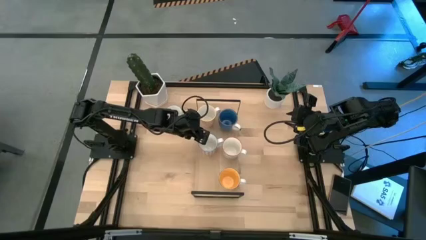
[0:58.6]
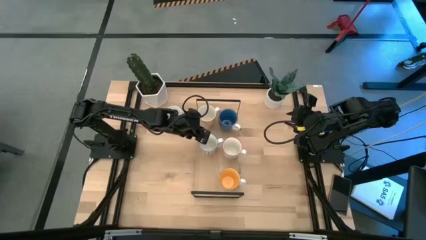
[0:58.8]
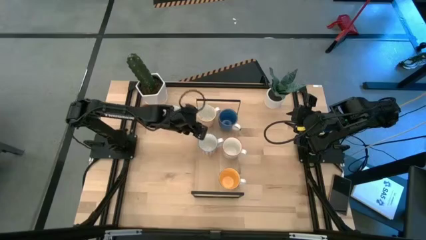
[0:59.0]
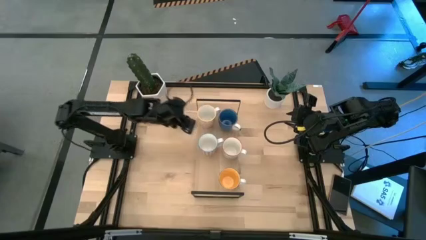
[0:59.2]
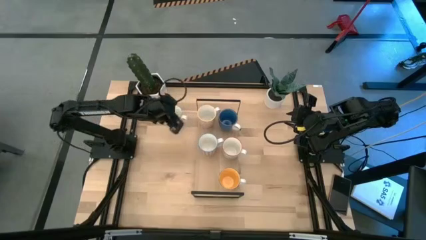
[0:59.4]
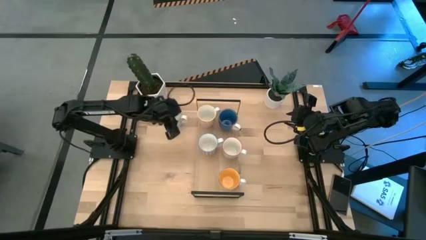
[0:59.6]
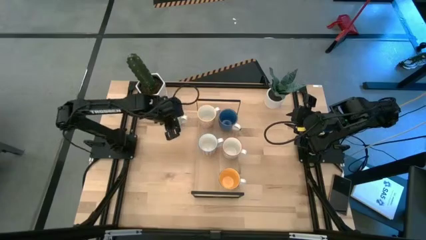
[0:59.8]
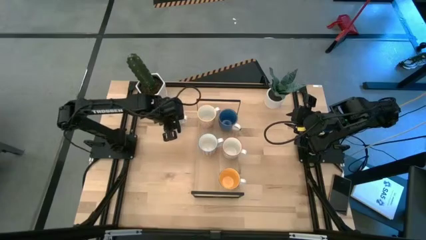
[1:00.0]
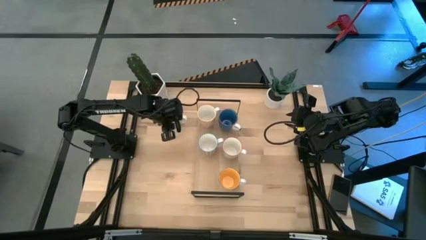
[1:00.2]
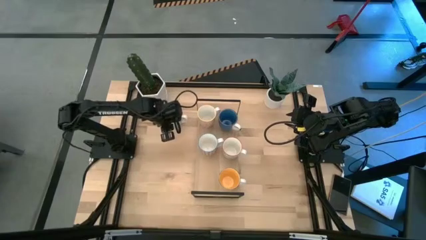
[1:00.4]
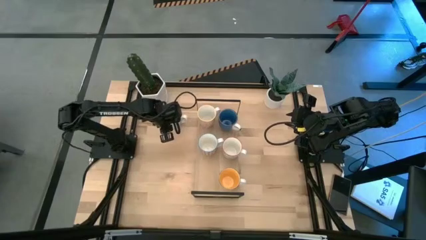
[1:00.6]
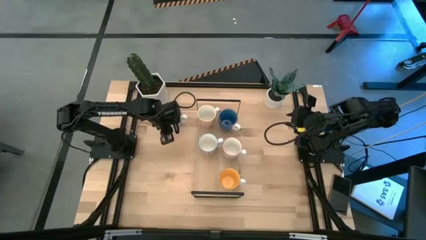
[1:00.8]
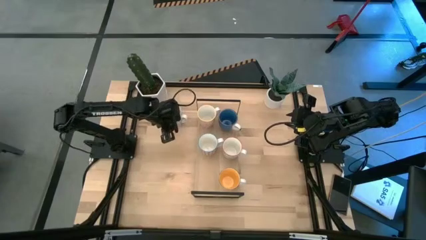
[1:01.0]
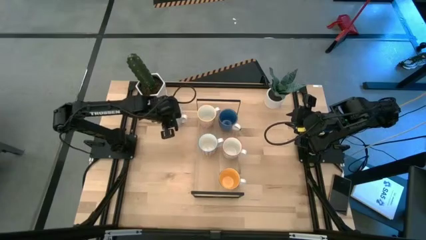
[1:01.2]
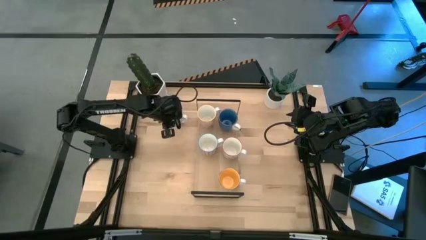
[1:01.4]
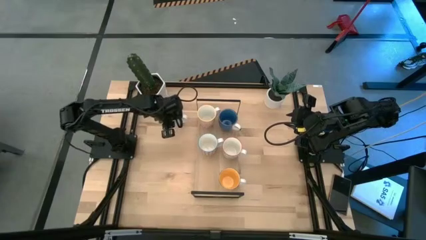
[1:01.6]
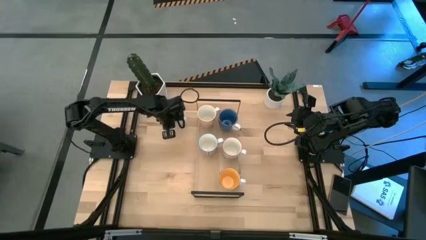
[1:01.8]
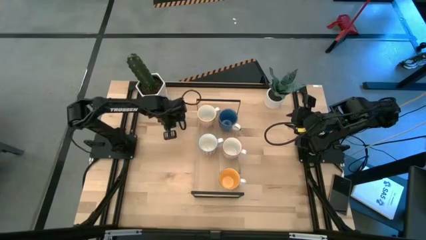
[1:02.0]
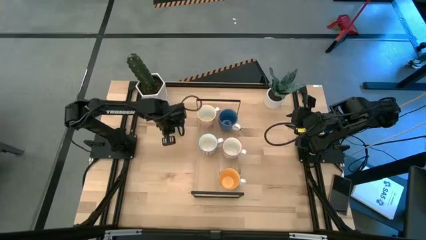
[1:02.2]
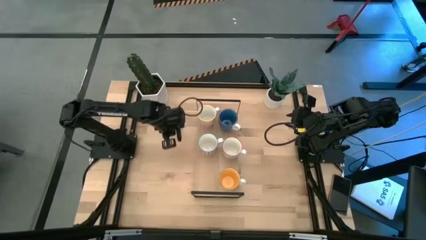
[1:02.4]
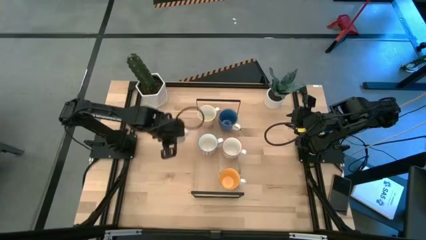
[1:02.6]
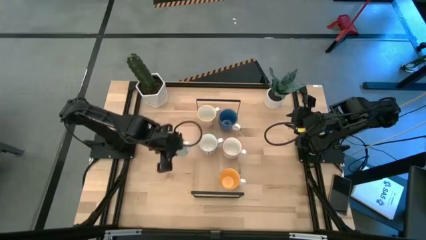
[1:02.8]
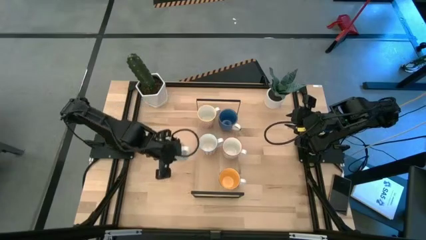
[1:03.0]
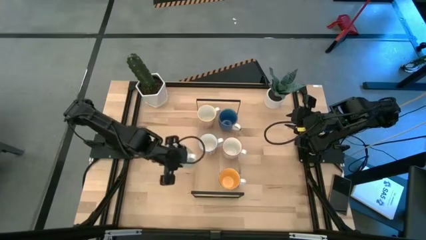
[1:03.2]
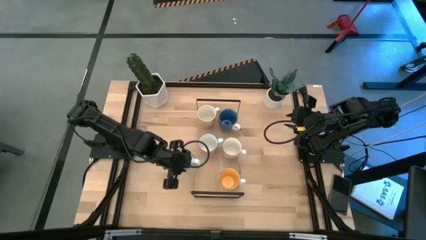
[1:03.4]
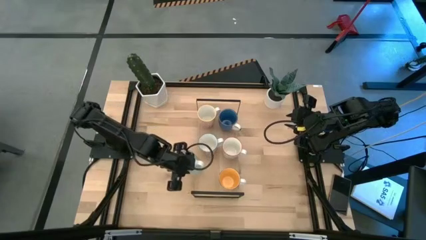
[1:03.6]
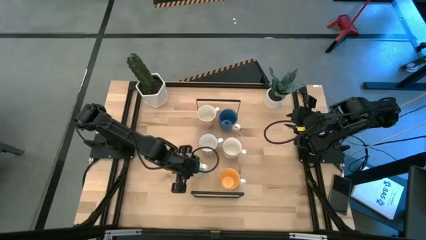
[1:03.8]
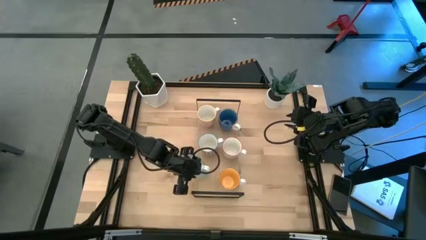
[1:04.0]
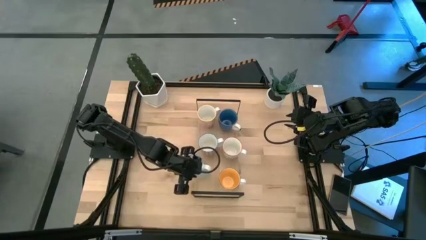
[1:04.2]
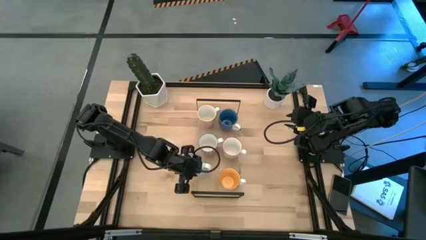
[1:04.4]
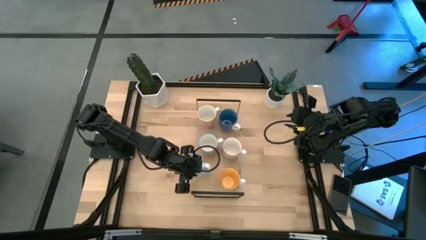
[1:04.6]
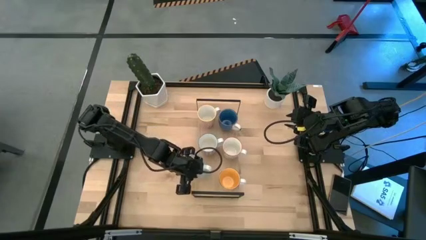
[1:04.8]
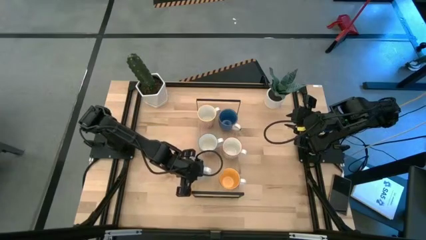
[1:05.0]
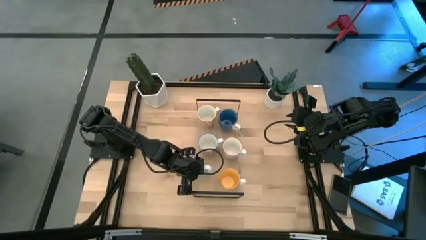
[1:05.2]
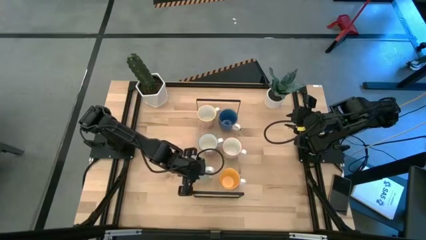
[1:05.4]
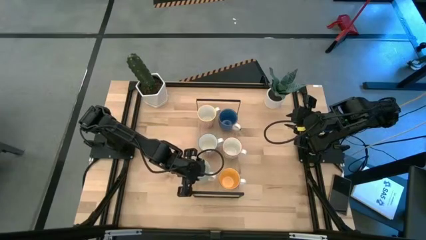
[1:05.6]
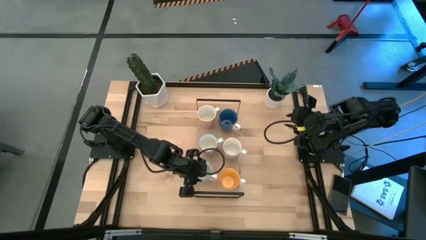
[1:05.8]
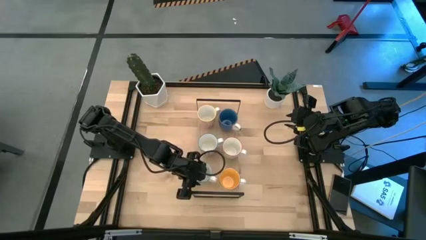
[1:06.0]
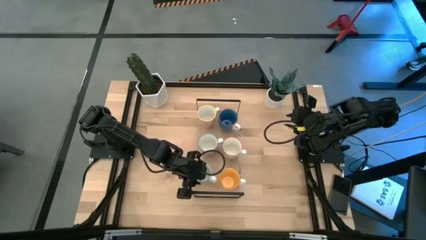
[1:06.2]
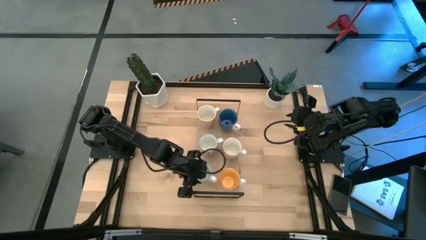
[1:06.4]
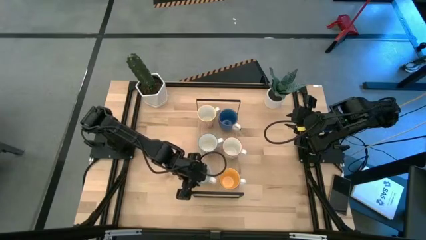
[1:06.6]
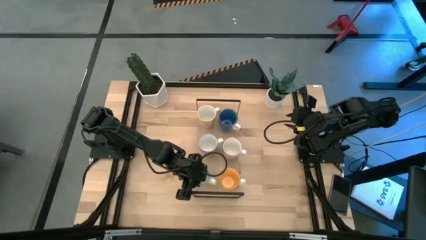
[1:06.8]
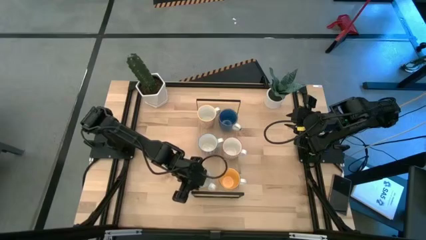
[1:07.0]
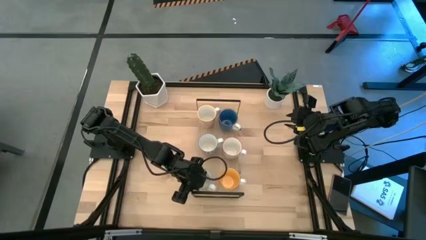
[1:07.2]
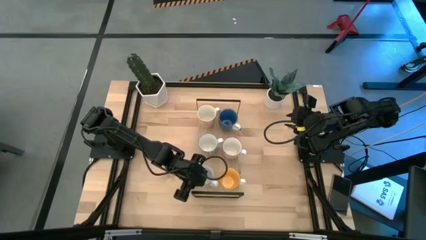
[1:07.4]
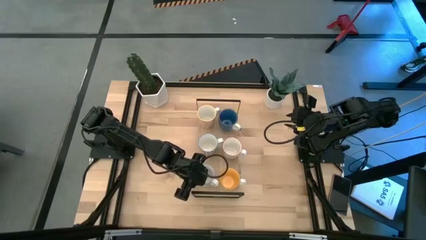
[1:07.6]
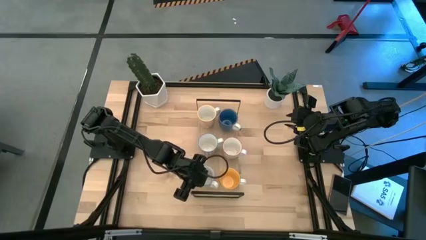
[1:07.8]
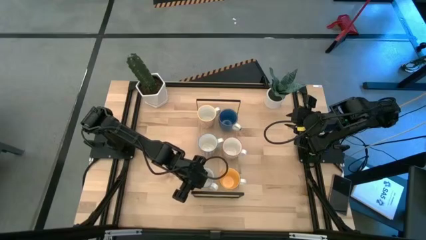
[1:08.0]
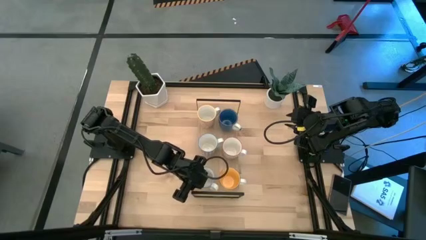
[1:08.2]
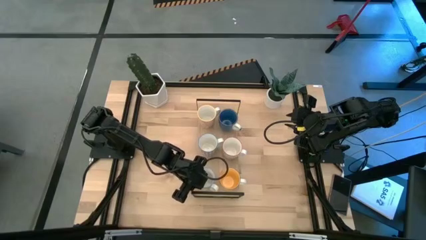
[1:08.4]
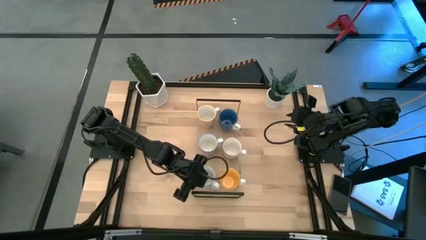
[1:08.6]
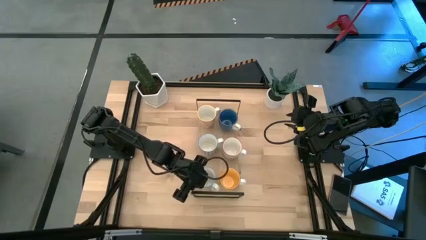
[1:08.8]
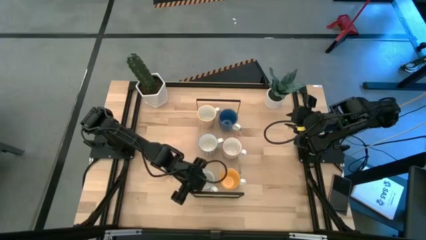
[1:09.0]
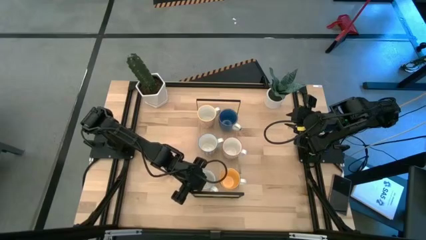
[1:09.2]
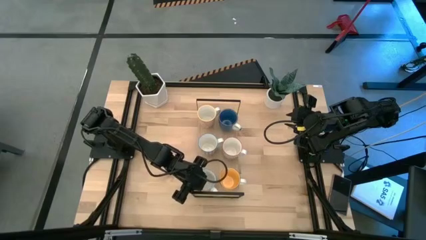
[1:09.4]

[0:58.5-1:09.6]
Task: Place coffee mugs
Put the green and white mug on the shelf

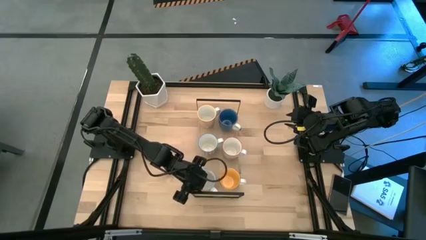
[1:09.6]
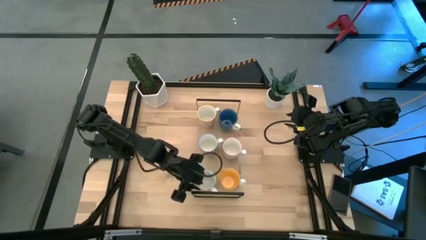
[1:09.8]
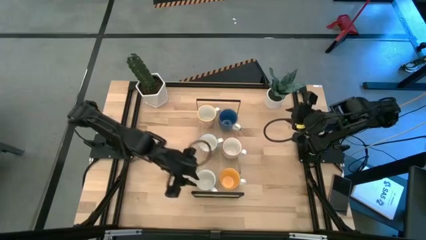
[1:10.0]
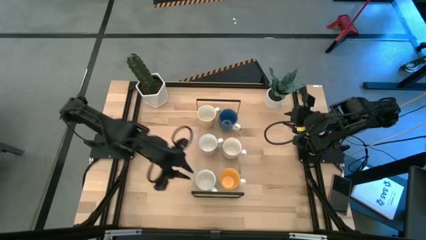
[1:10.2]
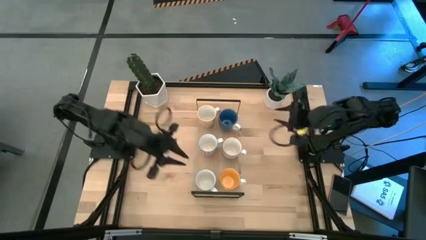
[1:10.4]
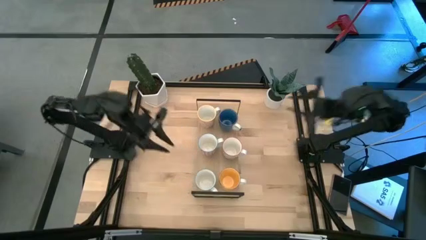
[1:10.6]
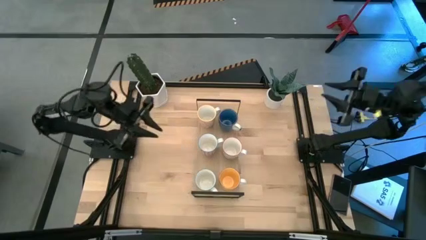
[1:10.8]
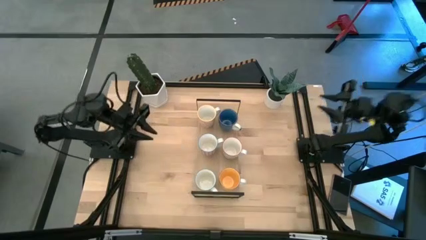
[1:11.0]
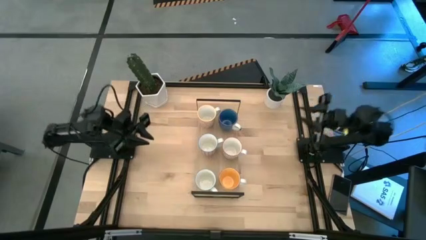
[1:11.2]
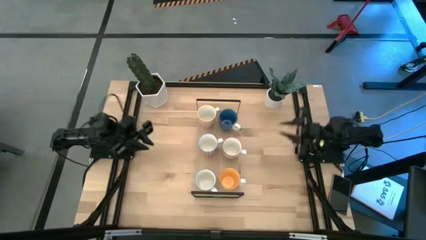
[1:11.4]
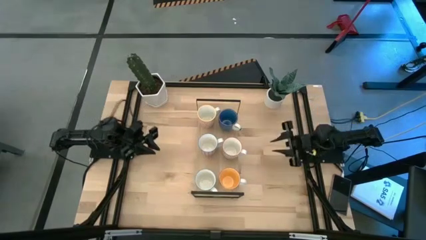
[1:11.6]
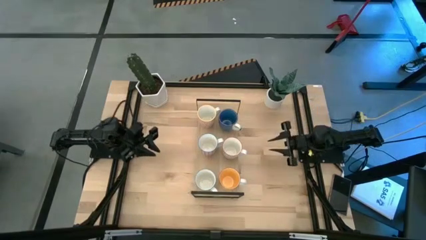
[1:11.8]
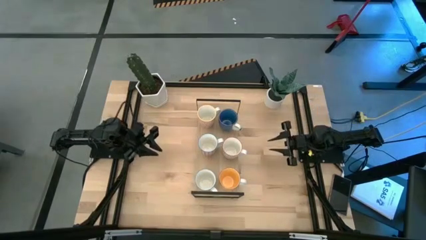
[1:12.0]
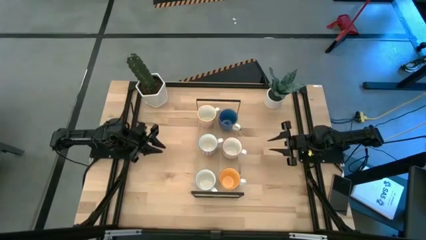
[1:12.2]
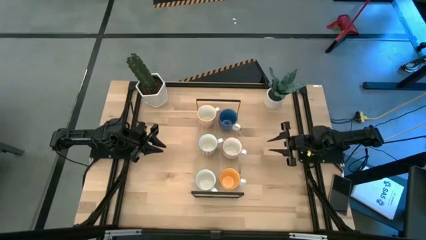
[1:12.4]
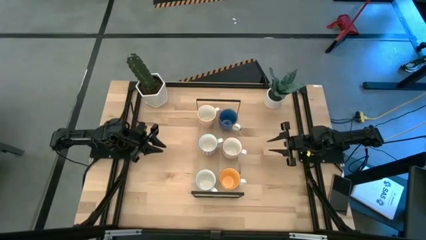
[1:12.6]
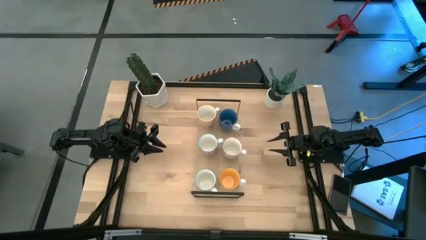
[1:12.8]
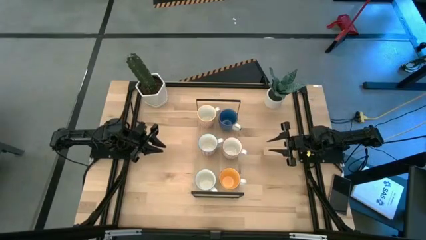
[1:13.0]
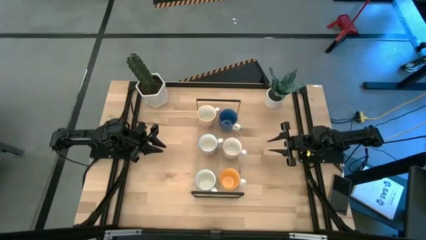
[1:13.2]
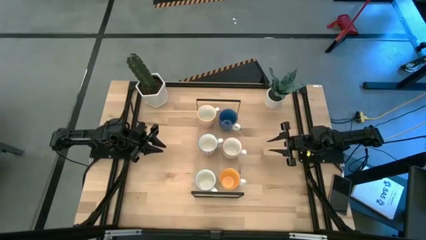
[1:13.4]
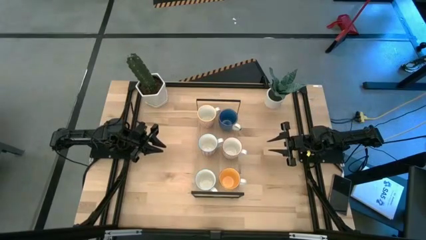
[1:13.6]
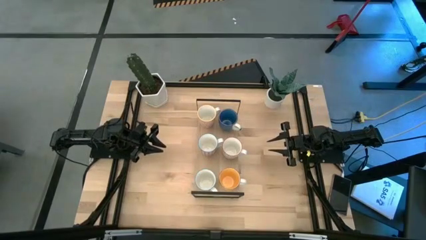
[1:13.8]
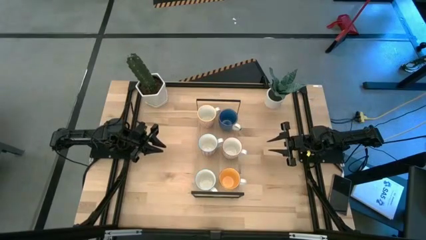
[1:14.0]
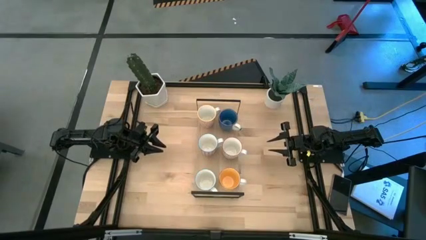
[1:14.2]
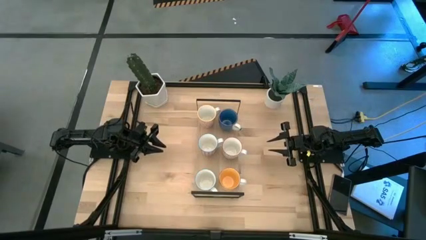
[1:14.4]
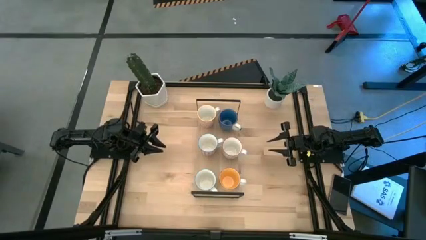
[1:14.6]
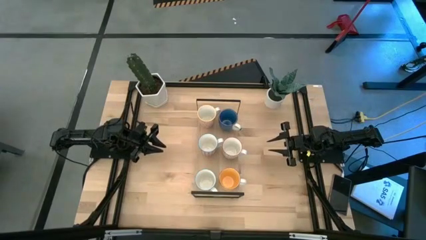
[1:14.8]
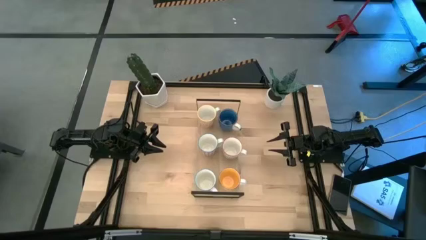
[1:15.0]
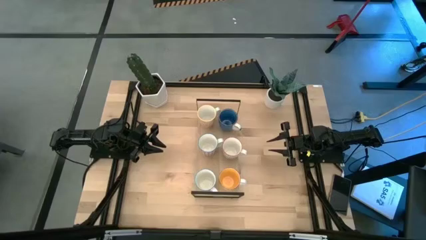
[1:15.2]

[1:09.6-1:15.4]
Return to Home Position
